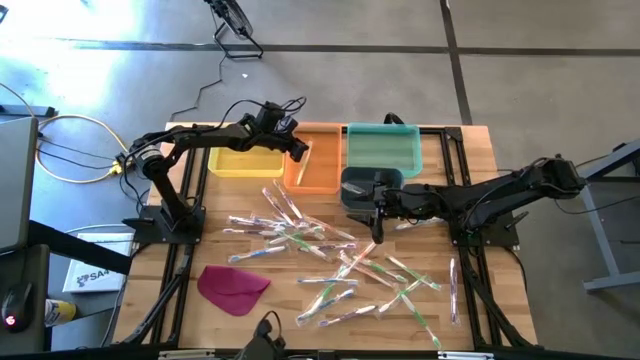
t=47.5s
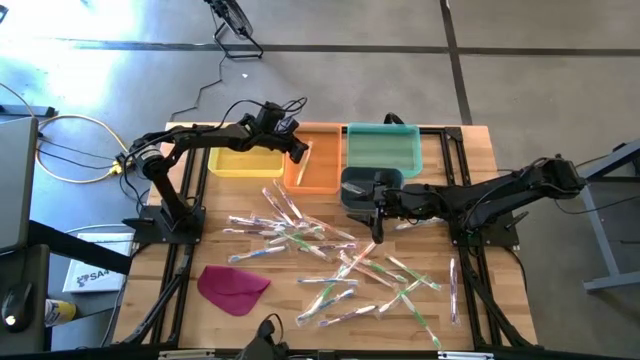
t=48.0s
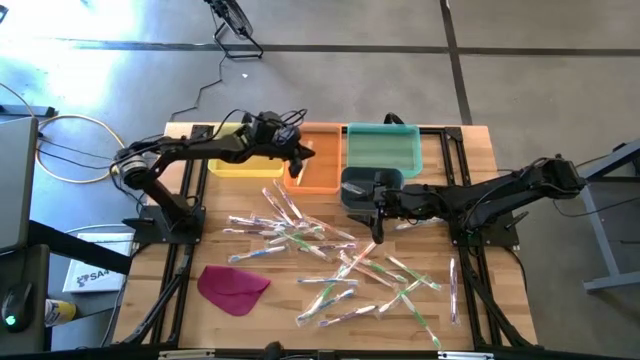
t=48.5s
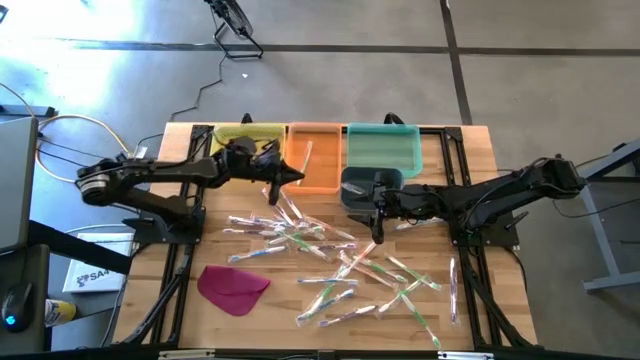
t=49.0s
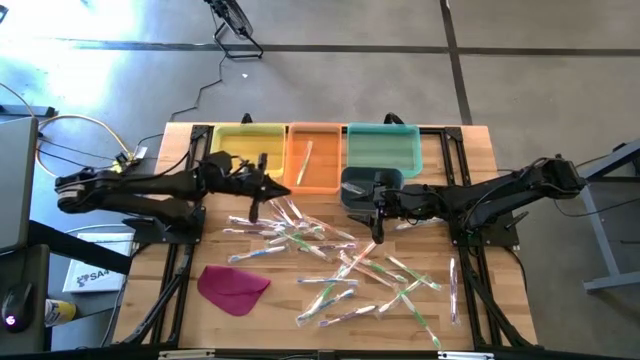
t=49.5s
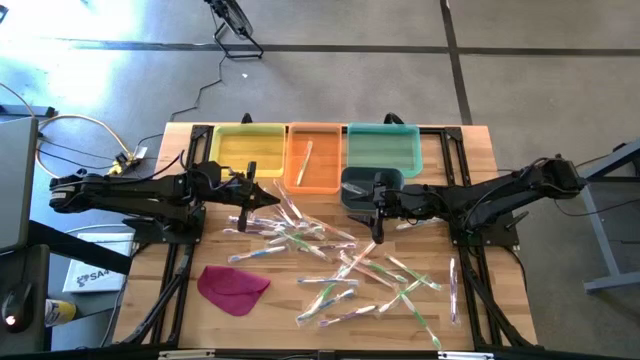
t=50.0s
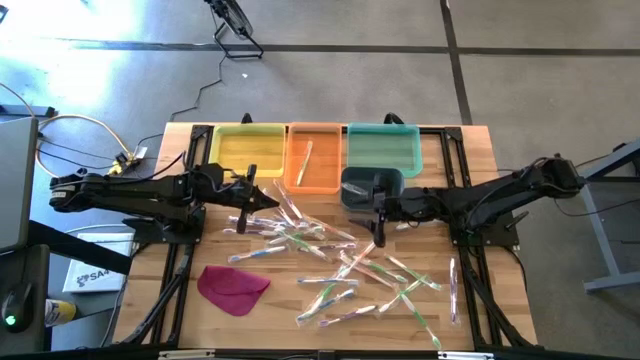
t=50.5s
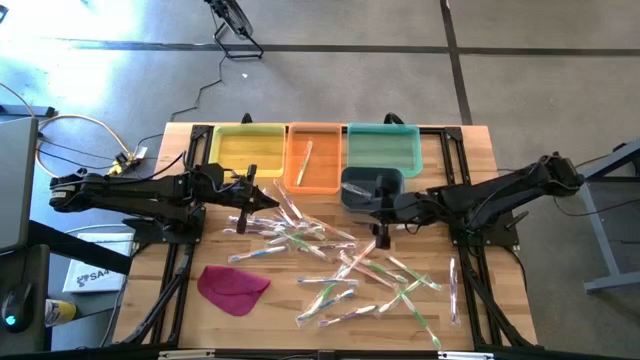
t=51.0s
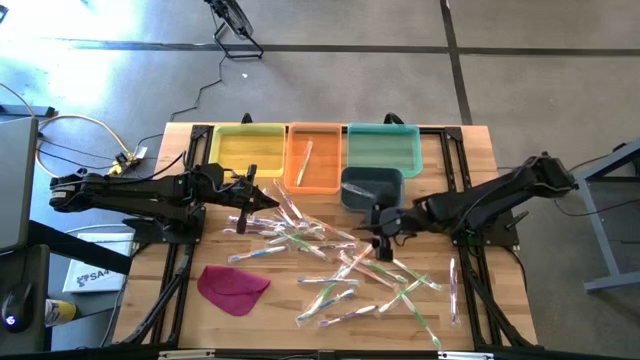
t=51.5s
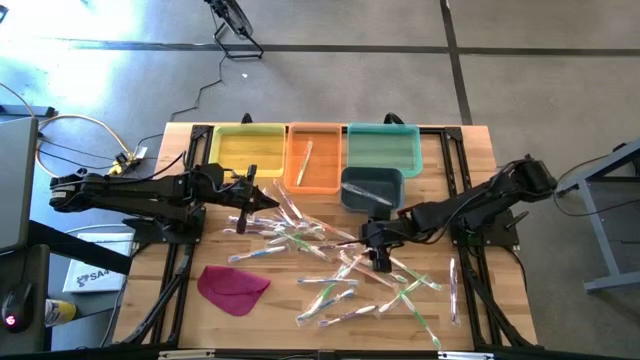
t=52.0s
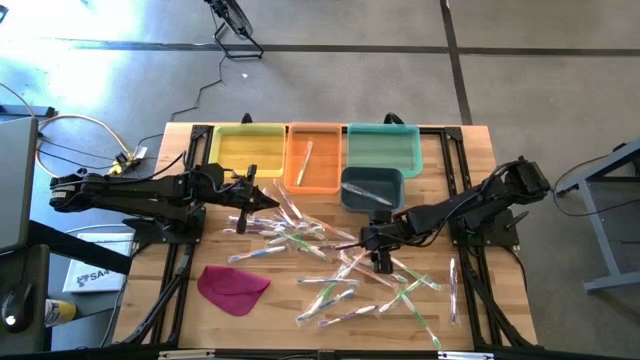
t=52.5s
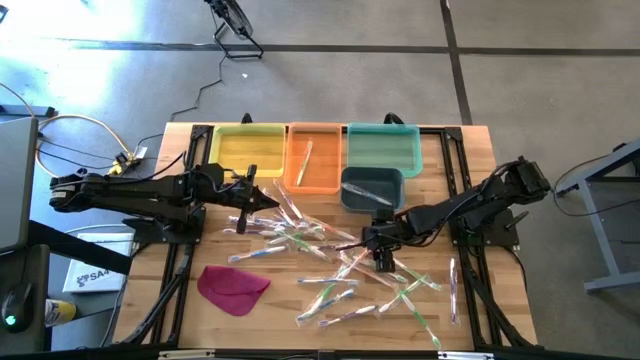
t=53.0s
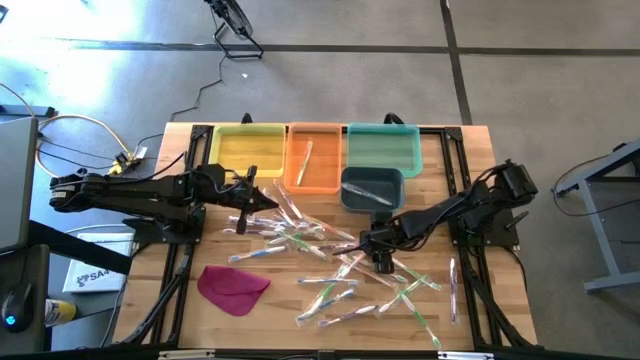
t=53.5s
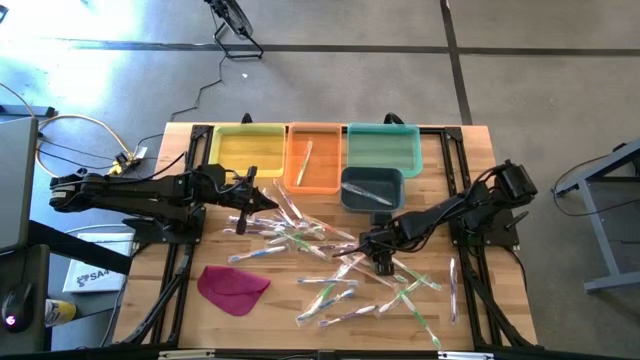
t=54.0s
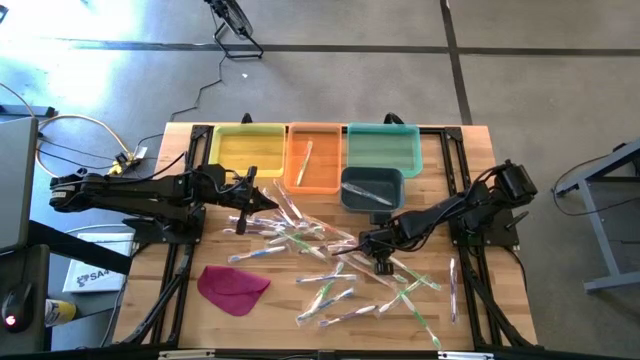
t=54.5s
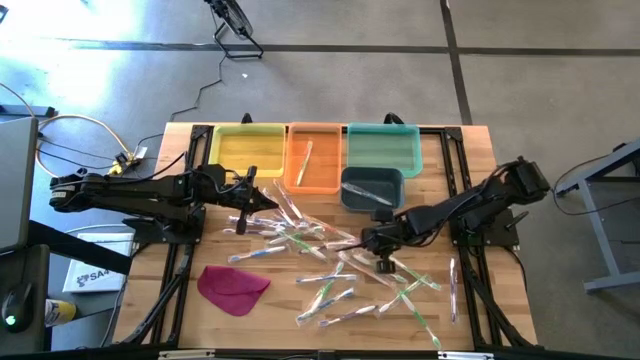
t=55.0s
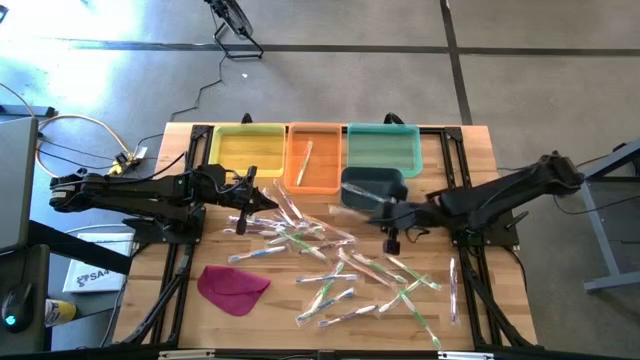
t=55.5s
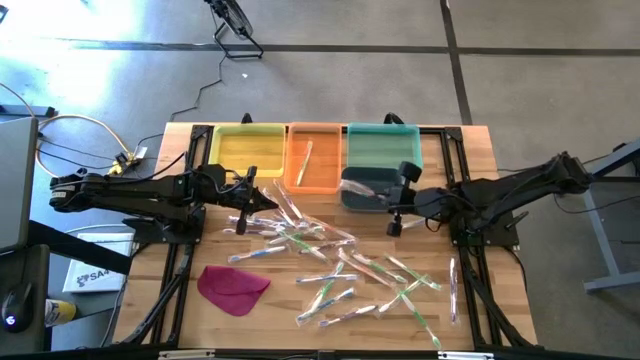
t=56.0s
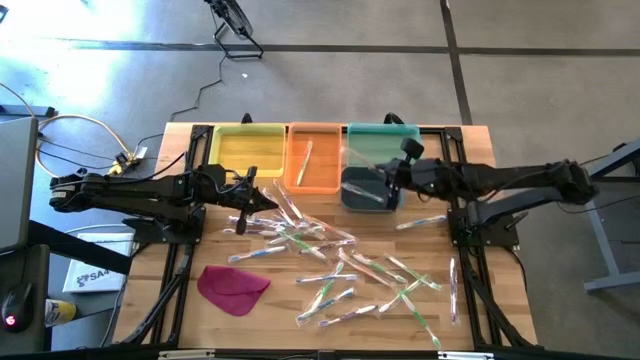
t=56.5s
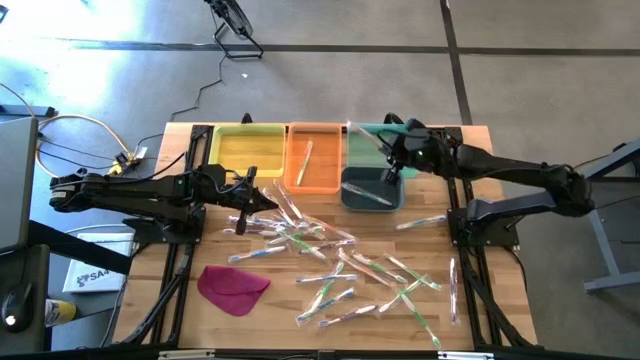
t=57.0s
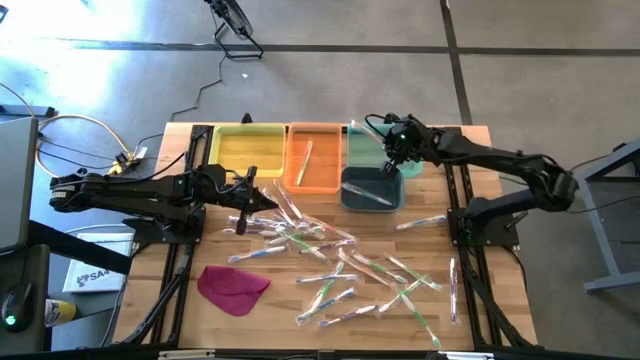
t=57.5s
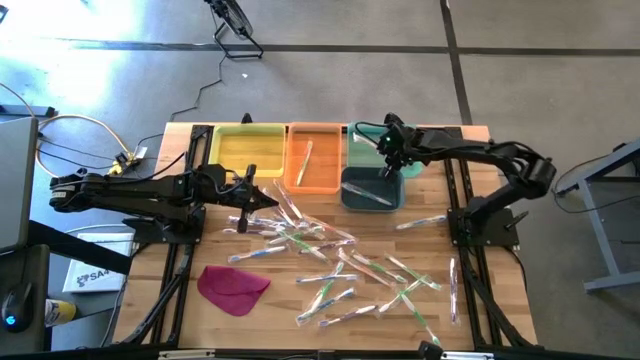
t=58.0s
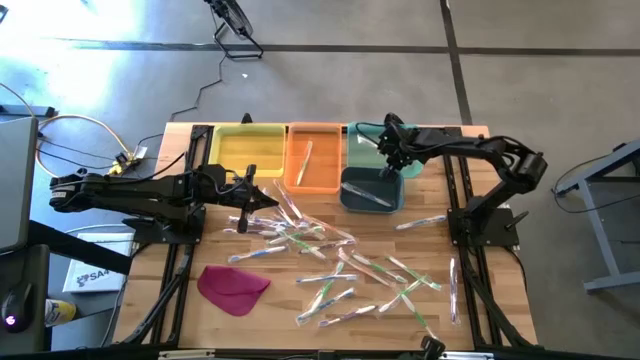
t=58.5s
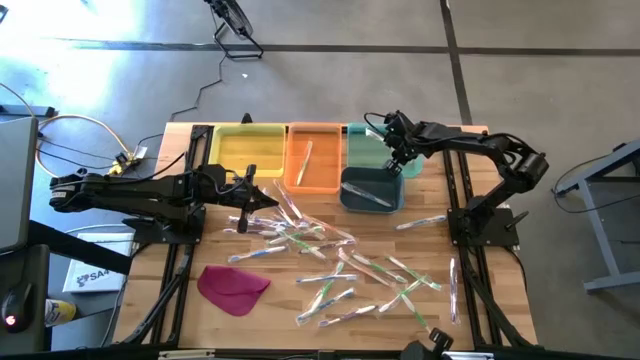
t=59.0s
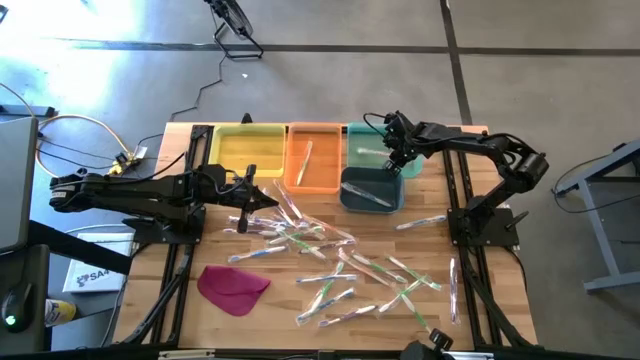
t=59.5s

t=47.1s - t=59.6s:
Task: Pick & Place Toothbrushes
Put the orange toothbrush into the blue bin

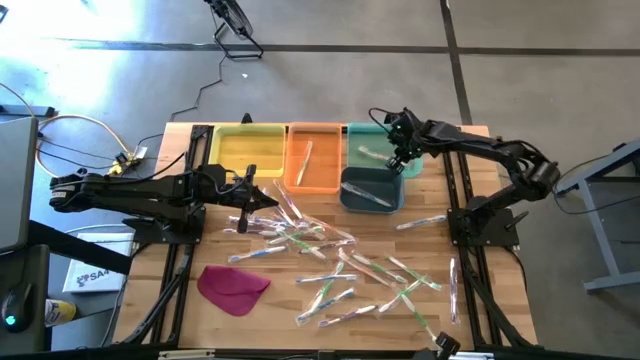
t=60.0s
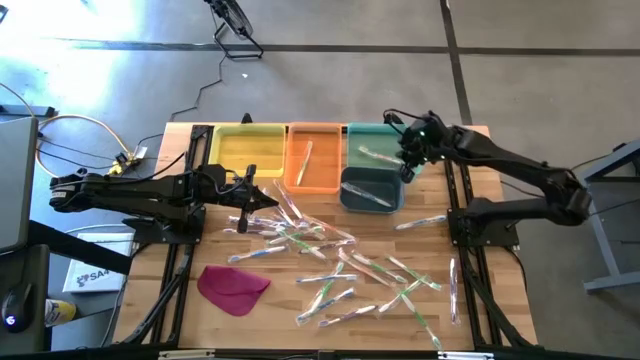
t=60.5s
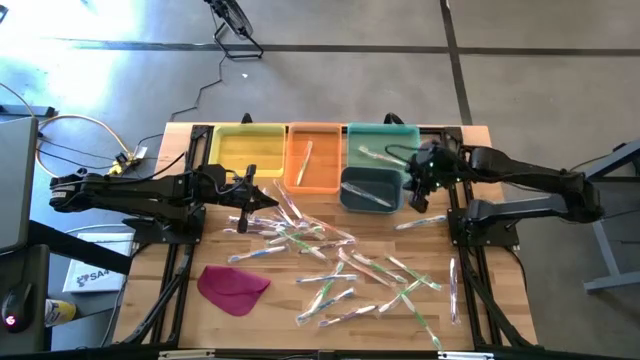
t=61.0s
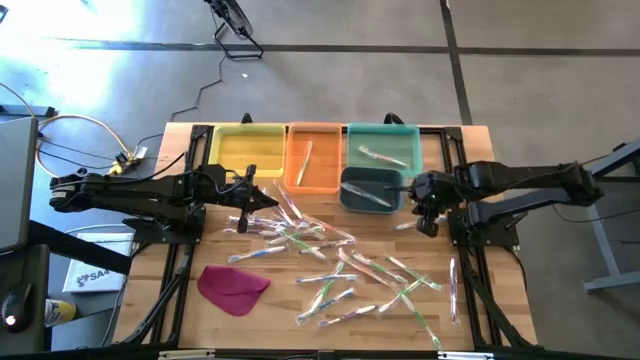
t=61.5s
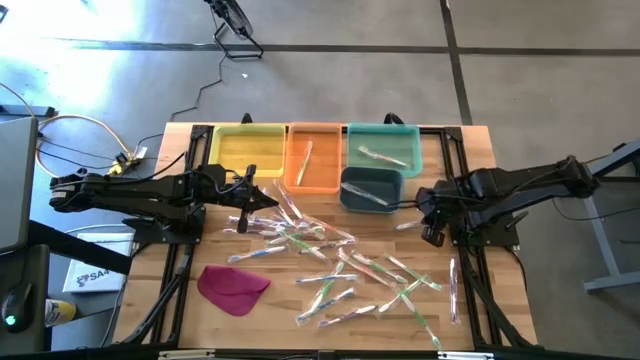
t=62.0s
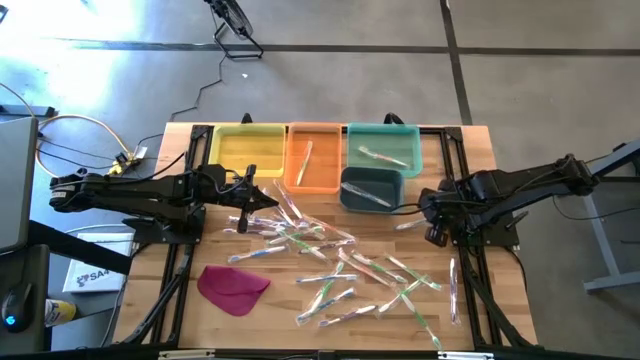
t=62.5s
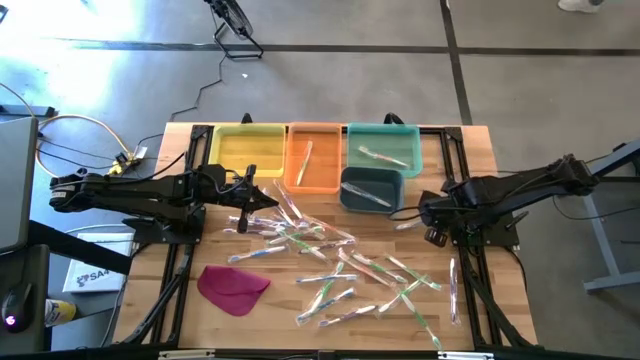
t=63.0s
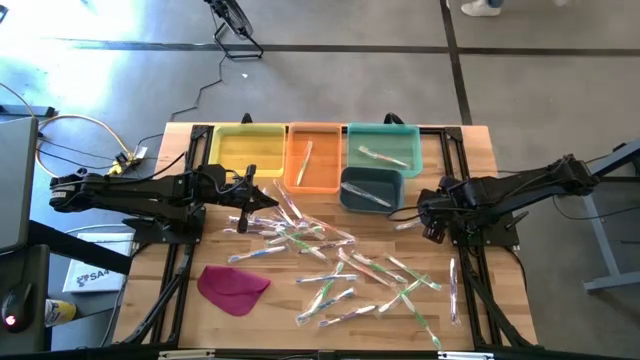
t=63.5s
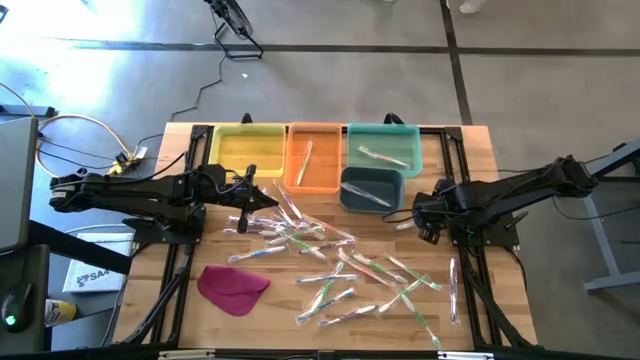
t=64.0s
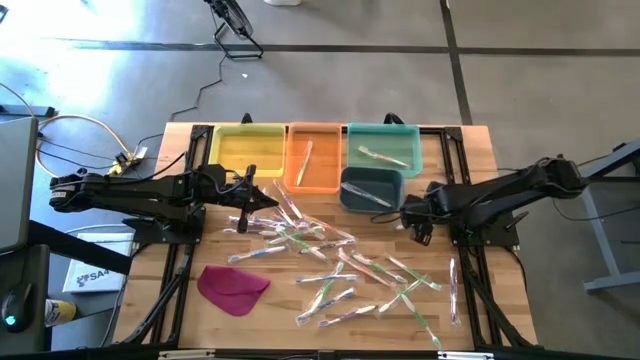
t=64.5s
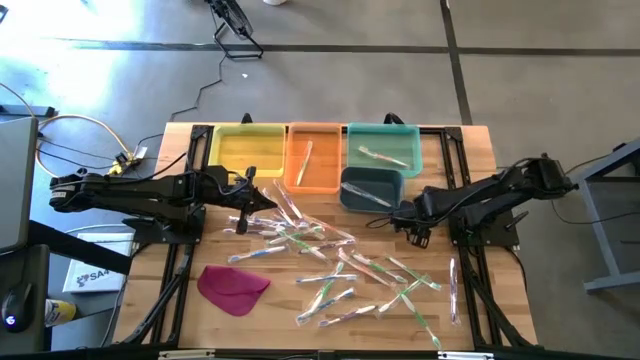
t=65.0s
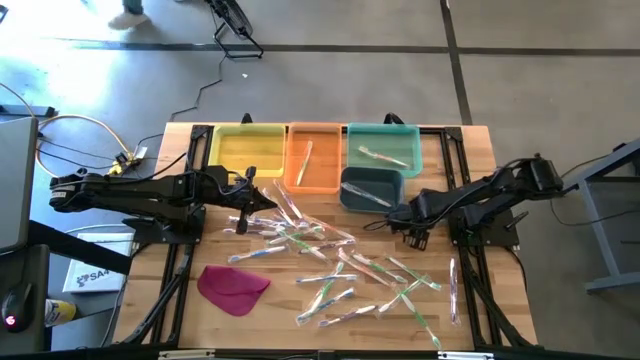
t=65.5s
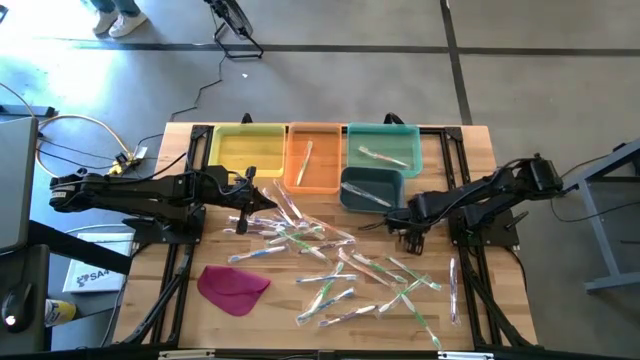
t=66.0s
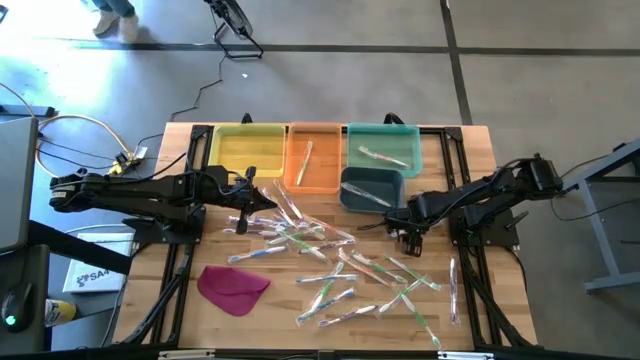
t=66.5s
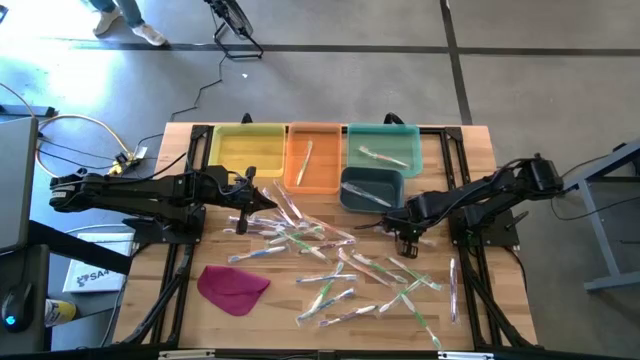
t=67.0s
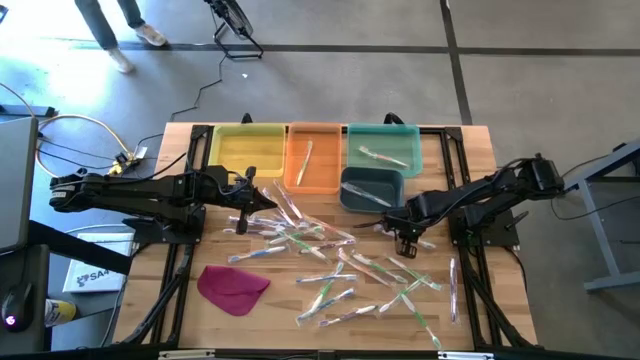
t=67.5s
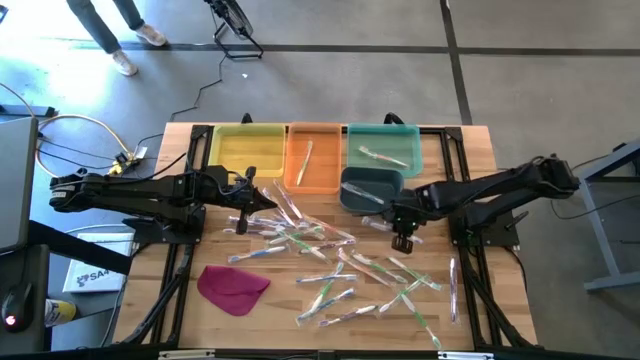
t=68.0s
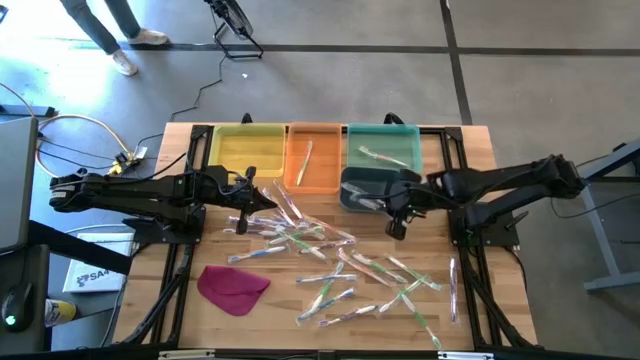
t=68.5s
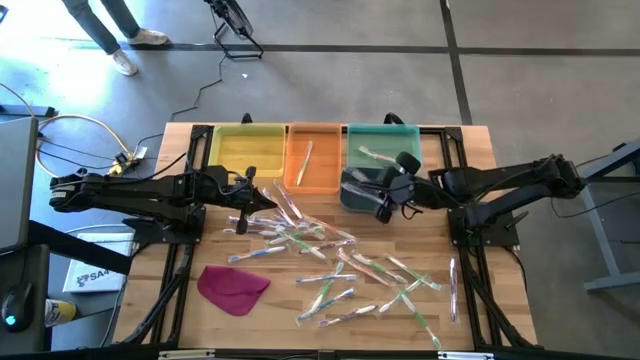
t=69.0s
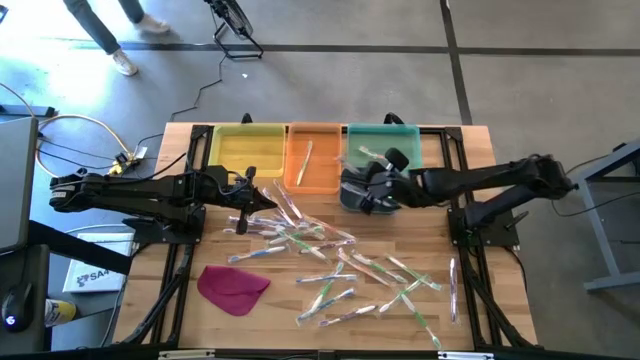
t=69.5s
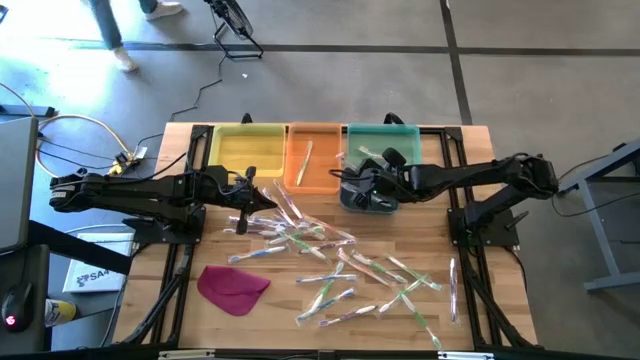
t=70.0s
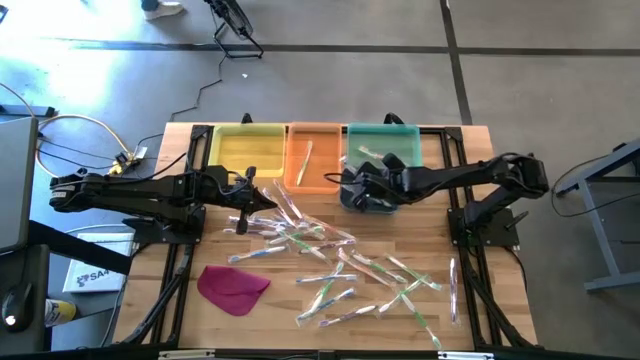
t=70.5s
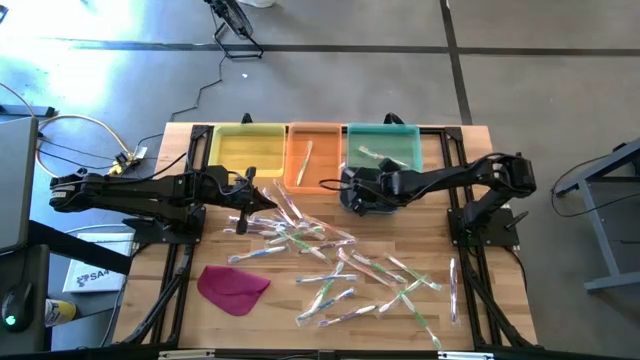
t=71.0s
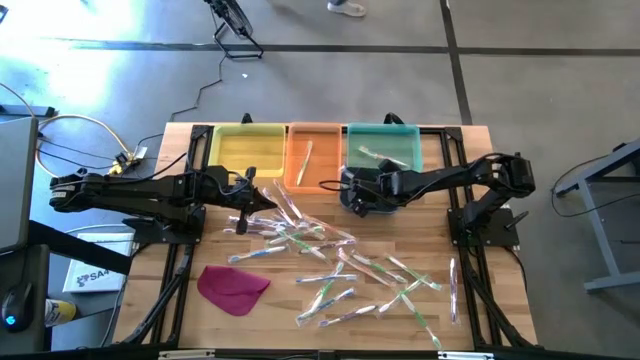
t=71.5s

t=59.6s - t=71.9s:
Put the blue toothbrush into the dark blue bin
